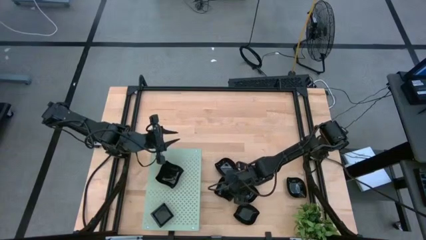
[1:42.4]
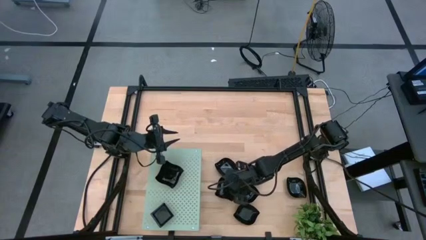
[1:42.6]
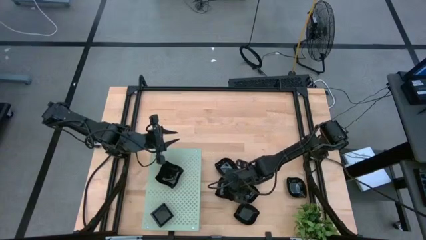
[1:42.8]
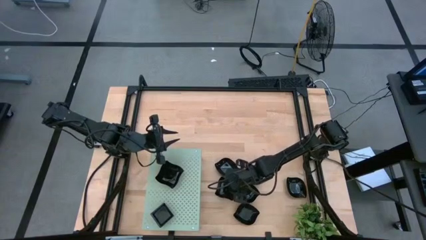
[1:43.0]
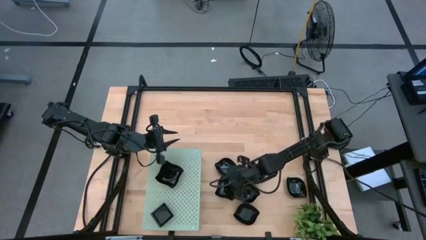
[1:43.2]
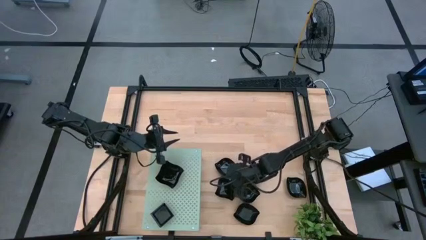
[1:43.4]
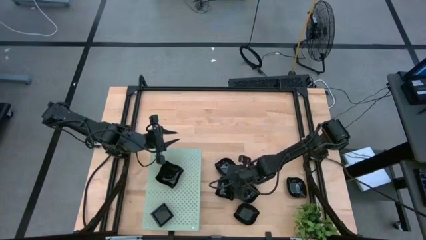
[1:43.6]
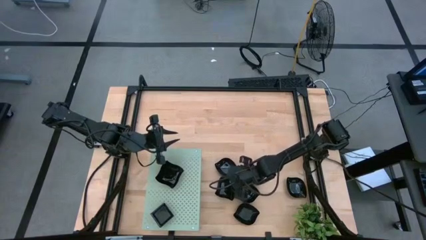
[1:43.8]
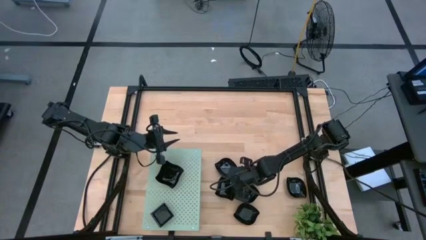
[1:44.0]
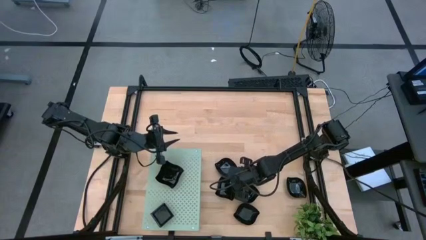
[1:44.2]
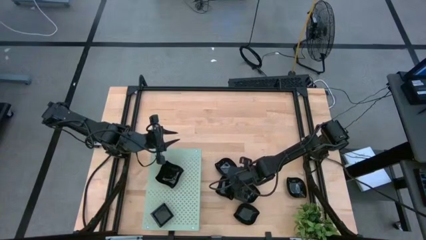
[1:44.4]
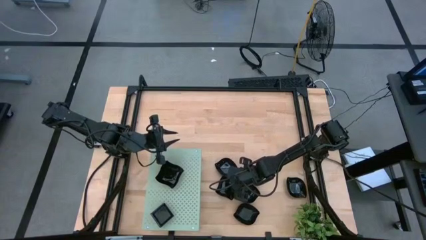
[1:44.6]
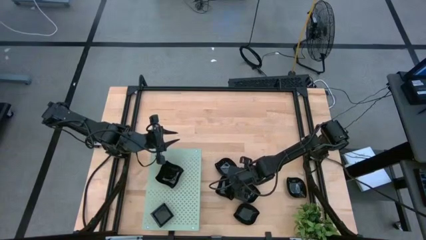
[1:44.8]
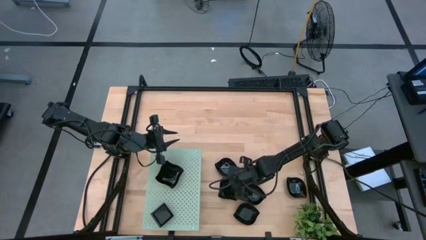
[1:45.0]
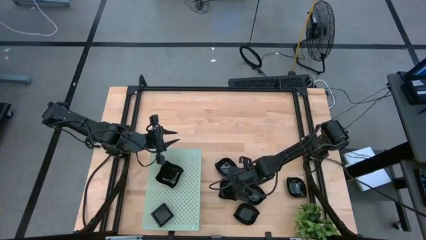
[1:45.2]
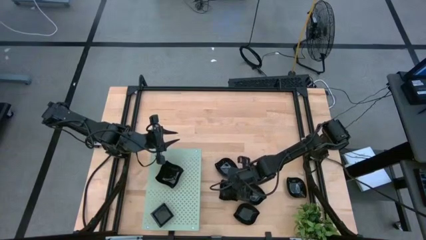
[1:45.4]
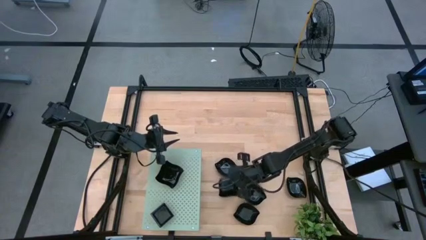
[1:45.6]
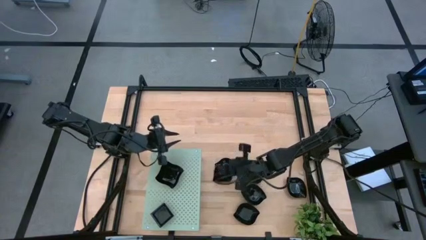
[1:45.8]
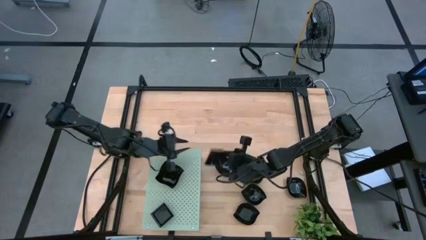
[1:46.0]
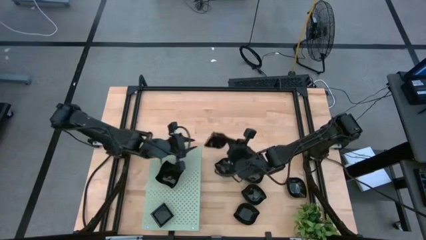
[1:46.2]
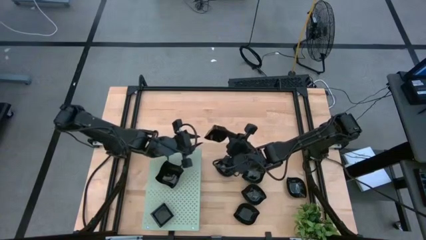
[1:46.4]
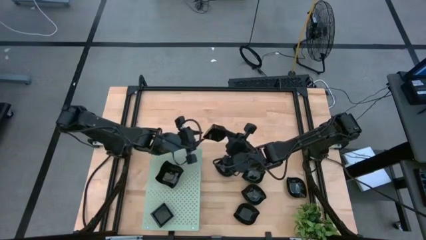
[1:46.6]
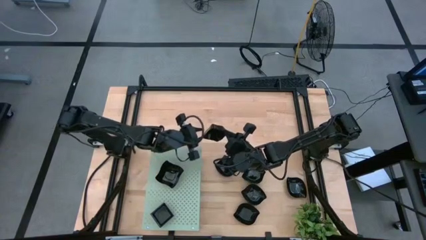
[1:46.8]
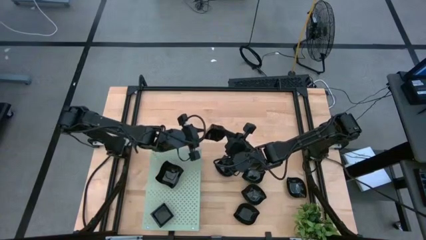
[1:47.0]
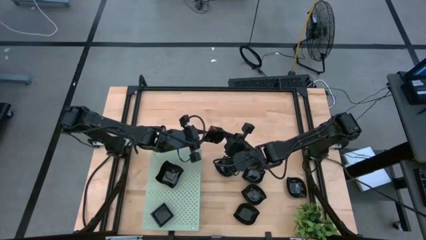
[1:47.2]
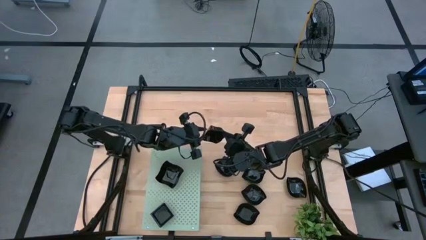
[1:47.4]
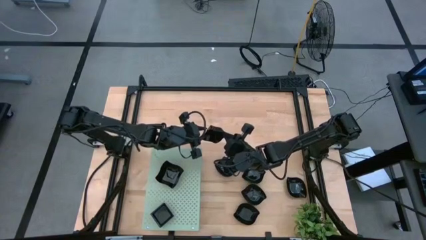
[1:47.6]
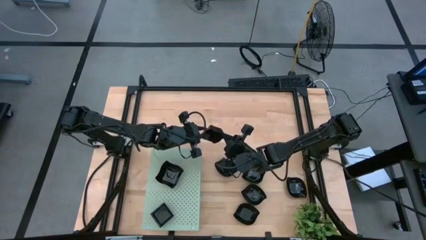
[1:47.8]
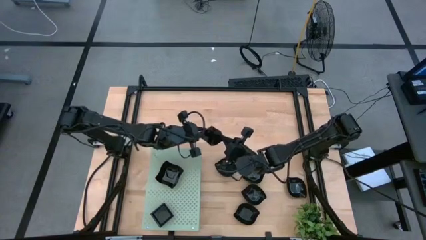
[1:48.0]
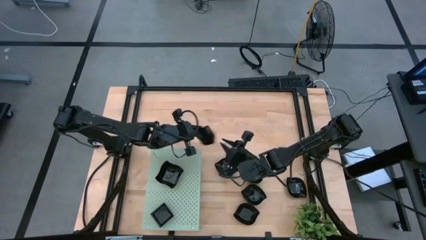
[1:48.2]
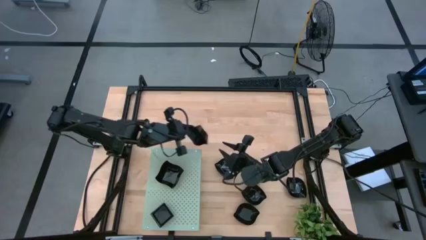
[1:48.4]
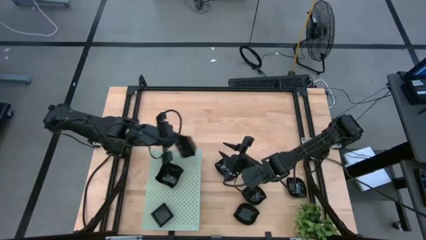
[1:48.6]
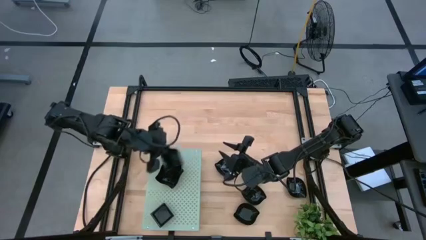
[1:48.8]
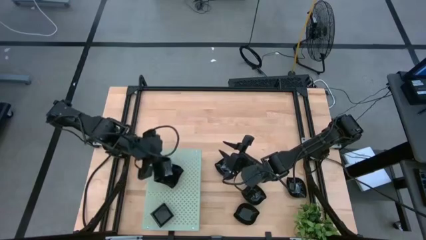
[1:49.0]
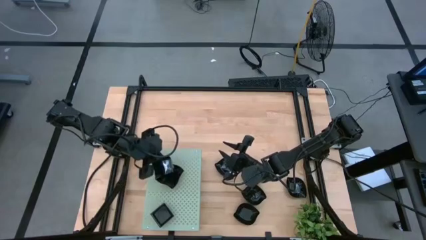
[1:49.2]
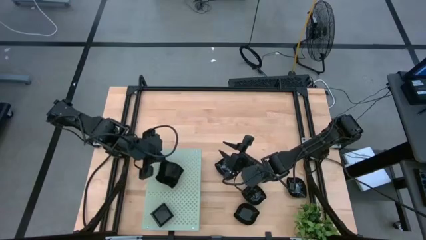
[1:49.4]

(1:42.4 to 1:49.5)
Task: Pick & Place Mini shaped plates
Stack the distorted square plate on top of the other distorted square plates on the shelf

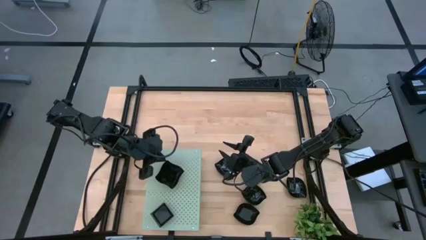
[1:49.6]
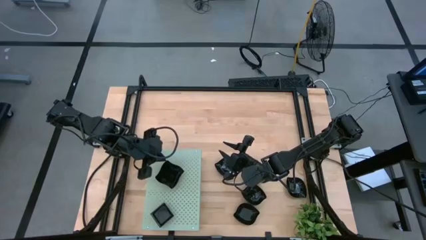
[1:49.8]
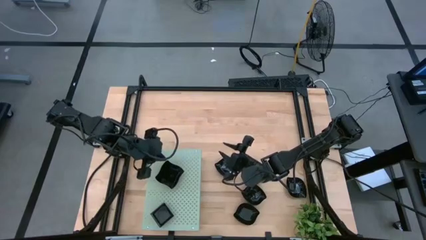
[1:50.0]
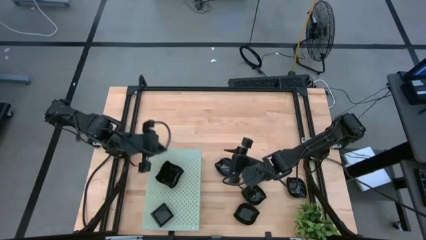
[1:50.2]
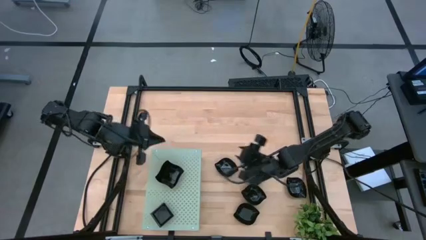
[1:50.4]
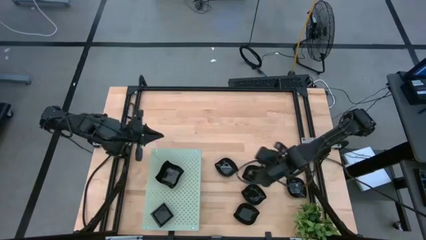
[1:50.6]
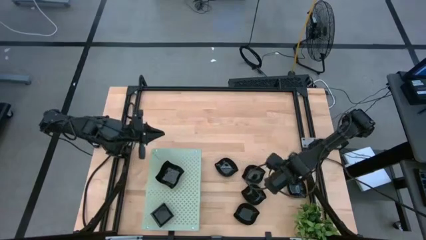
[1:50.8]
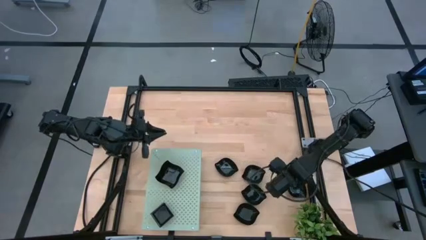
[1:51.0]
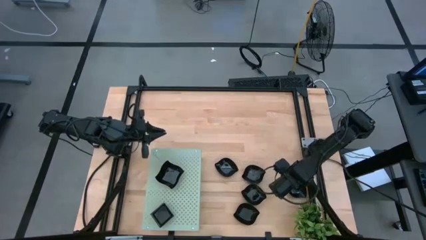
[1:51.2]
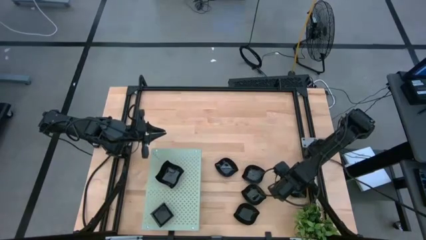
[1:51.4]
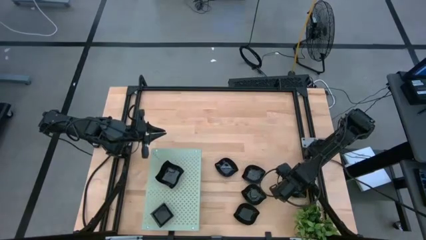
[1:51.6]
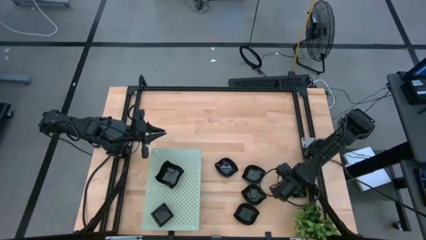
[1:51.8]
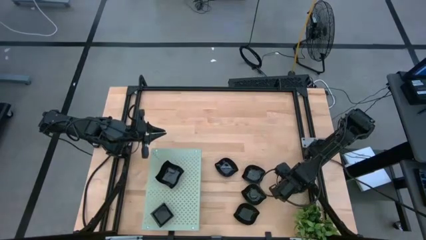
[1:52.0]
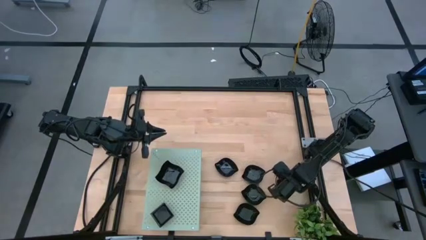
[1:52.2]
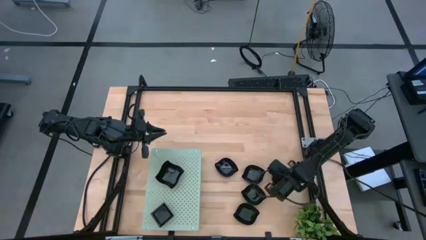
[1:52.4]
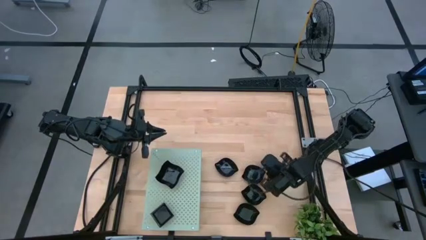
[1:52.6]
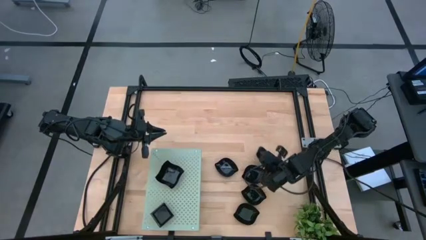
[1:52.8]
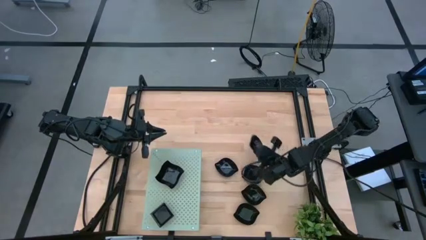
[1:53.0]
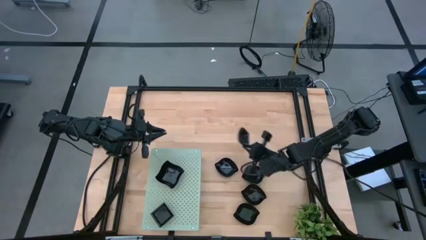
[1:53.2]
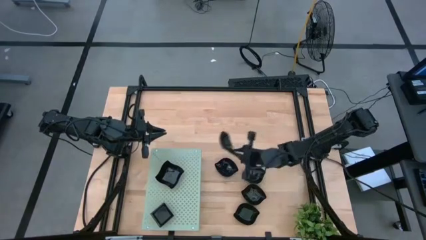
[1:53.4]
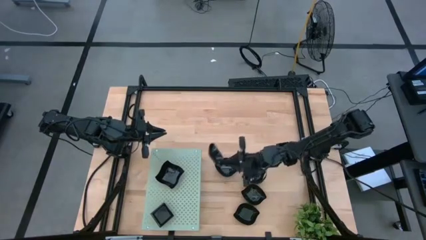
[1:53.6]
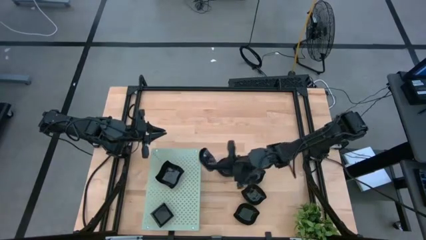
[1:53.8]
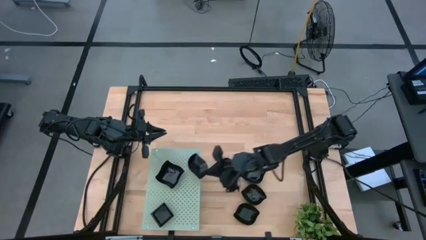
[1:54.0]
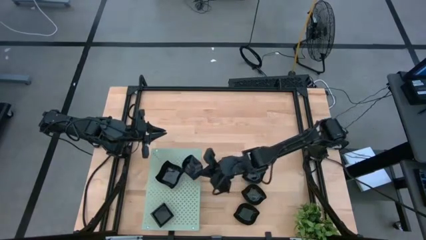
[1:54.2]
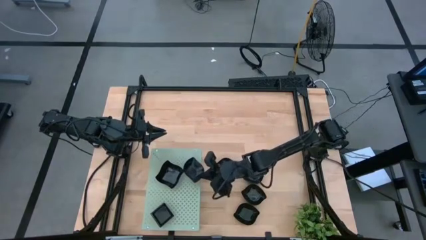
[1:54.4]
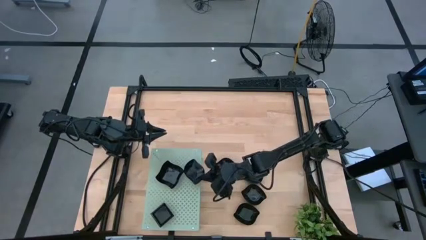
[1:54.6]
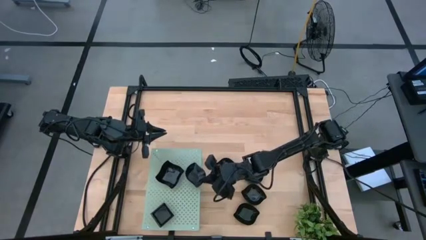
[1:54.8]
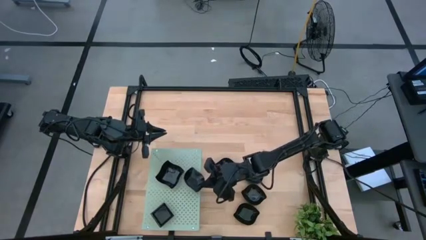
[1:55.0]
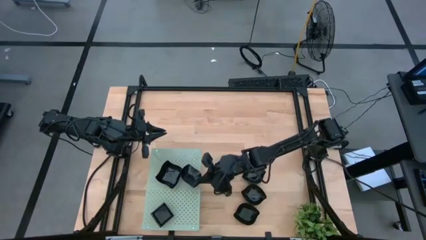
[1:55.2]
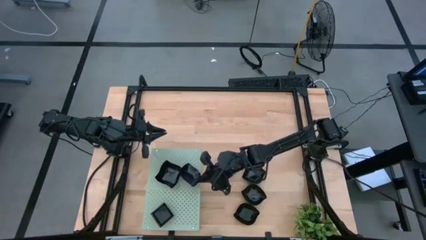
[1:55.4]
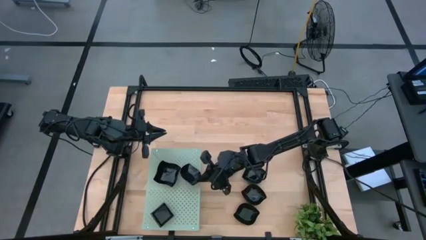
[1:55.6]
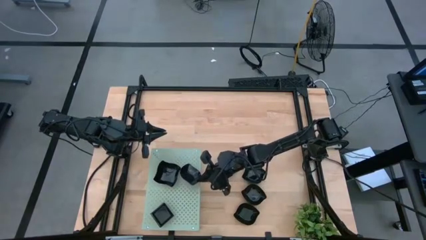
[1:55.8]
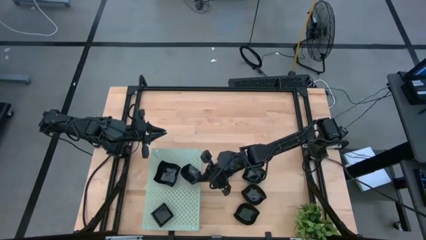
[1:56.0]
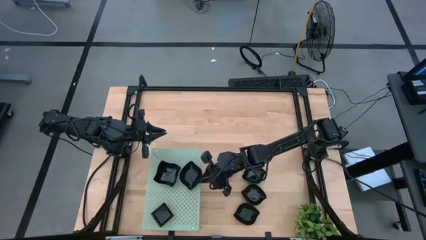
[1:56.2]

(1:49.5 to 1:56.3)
Put the leaf shaped plate on the shelf
